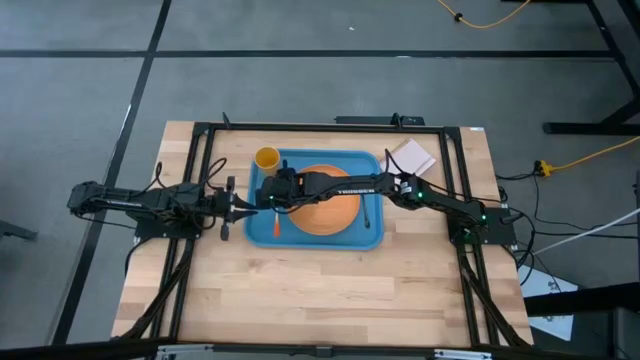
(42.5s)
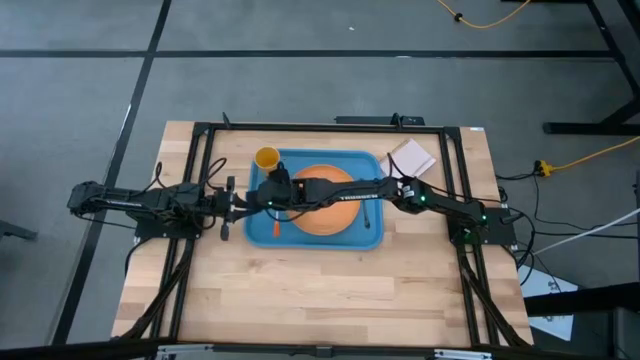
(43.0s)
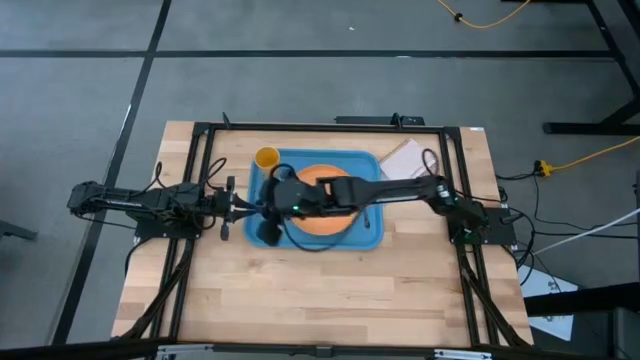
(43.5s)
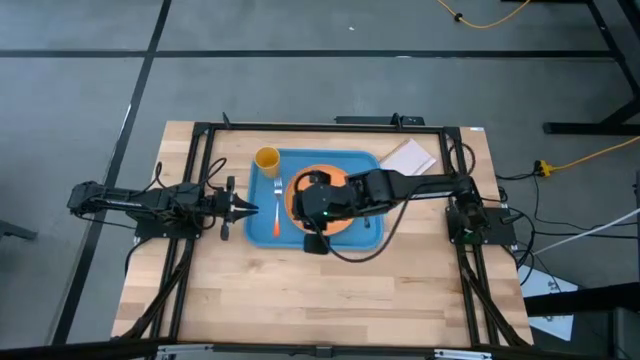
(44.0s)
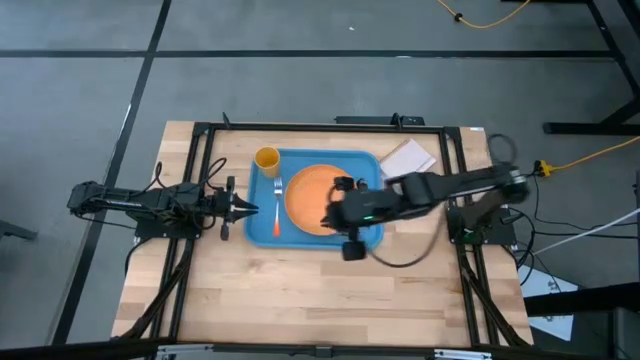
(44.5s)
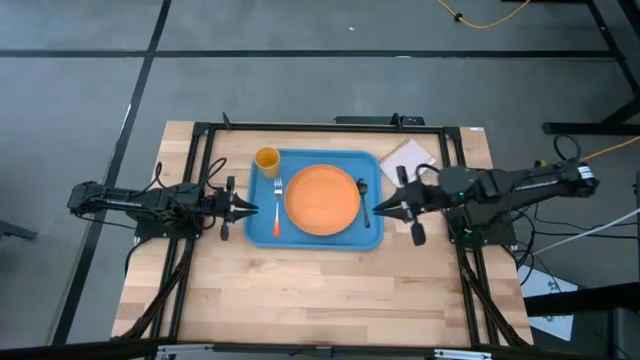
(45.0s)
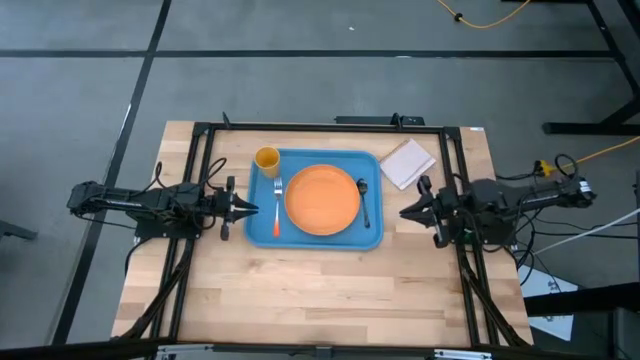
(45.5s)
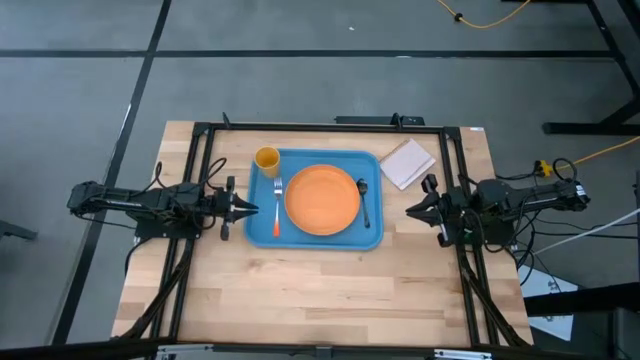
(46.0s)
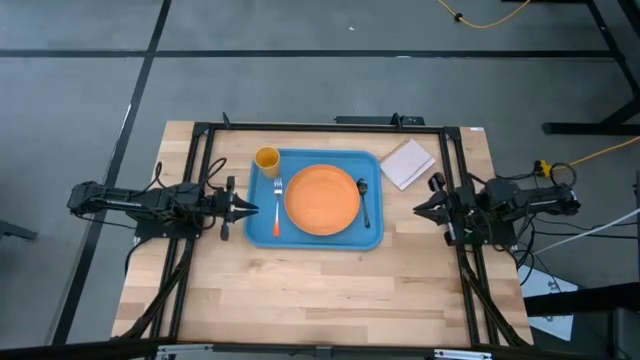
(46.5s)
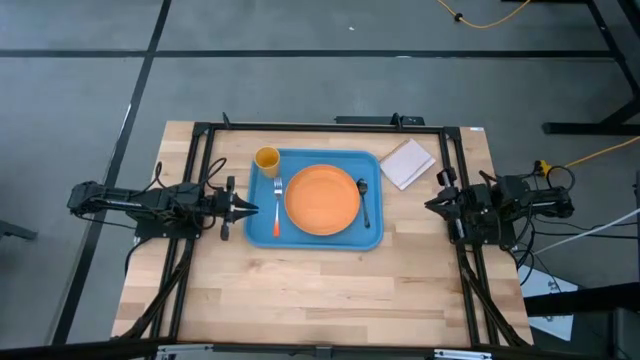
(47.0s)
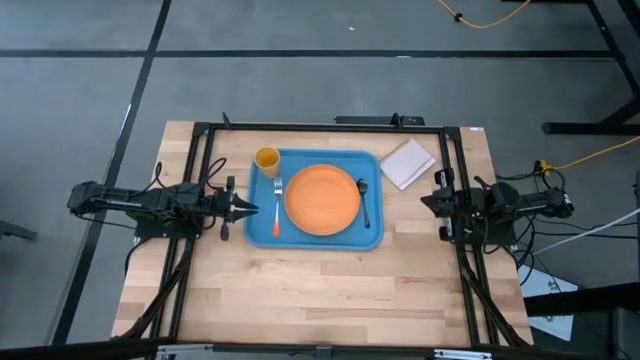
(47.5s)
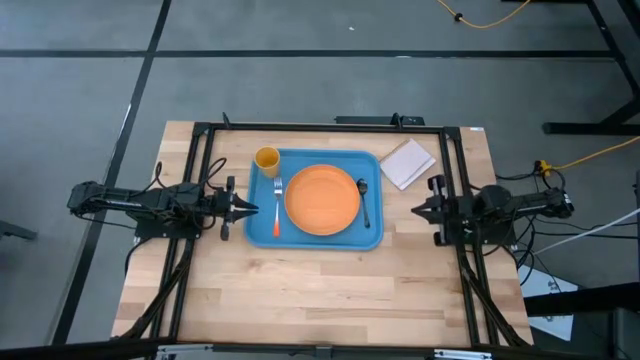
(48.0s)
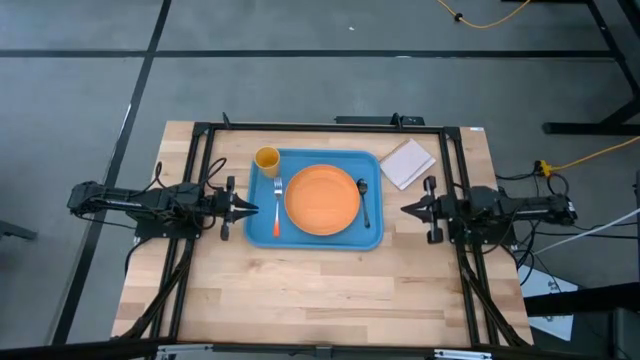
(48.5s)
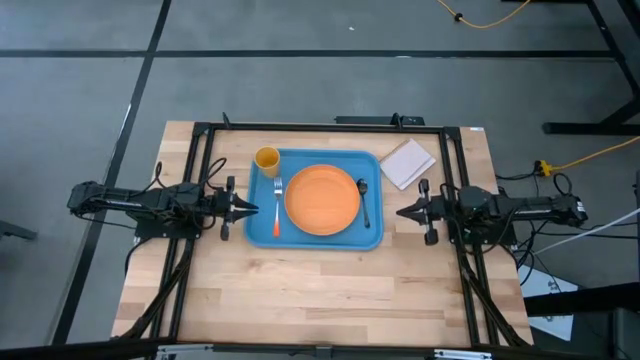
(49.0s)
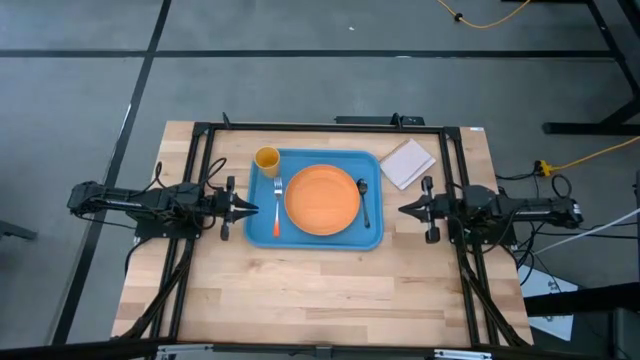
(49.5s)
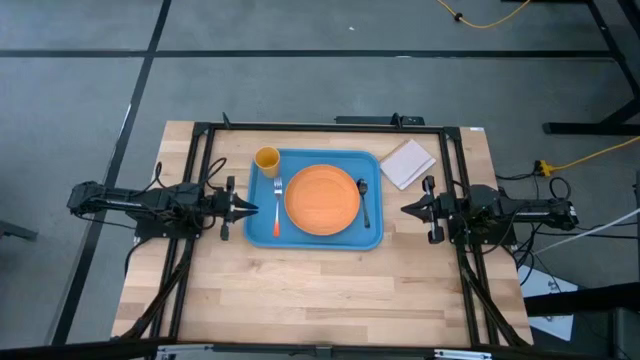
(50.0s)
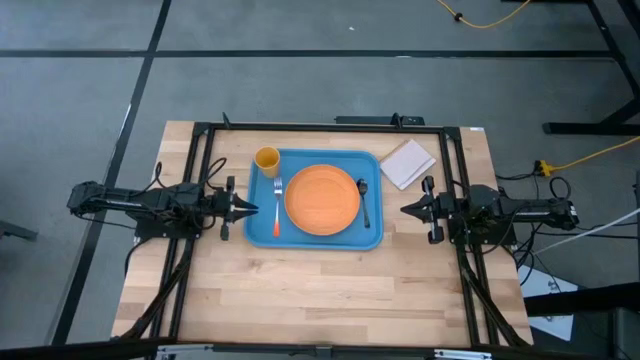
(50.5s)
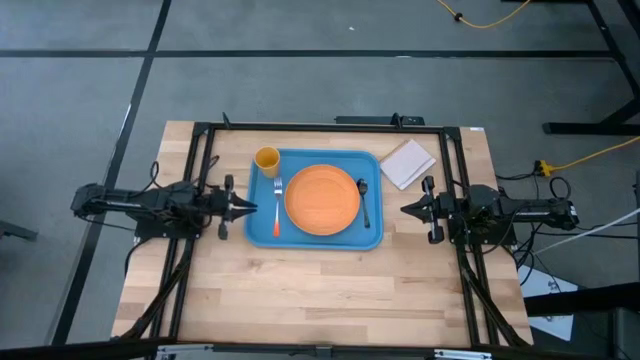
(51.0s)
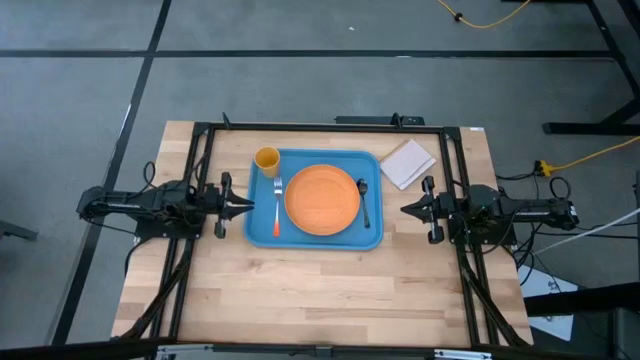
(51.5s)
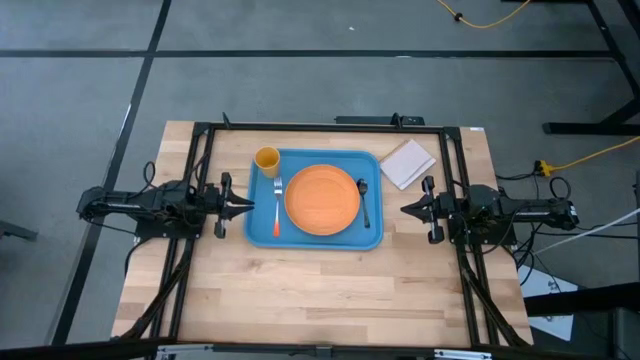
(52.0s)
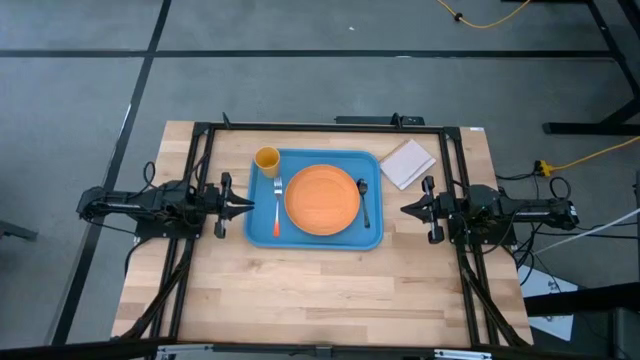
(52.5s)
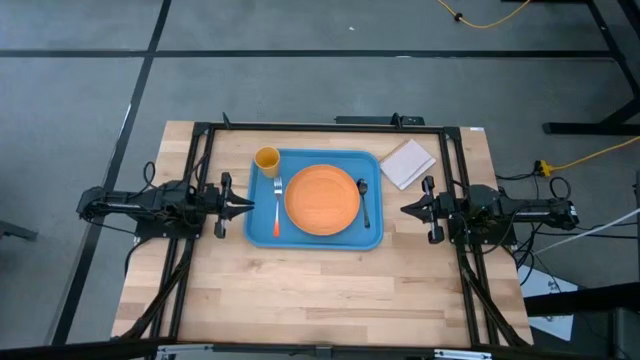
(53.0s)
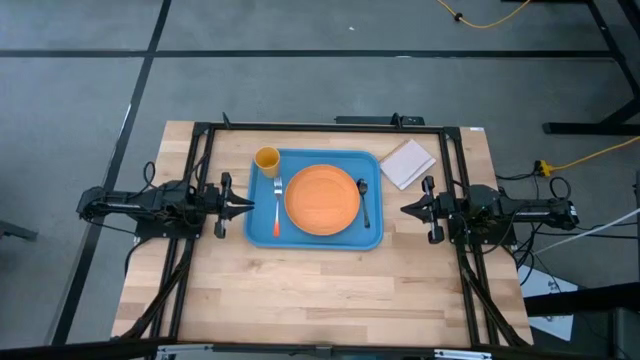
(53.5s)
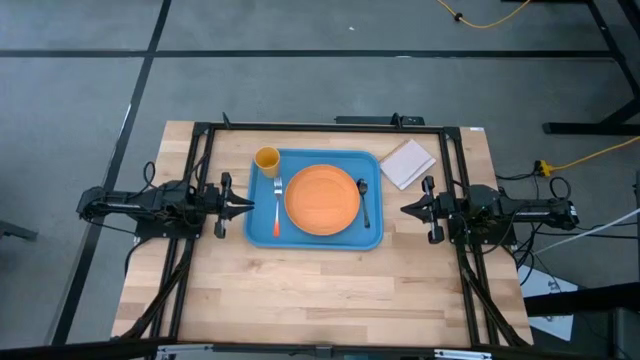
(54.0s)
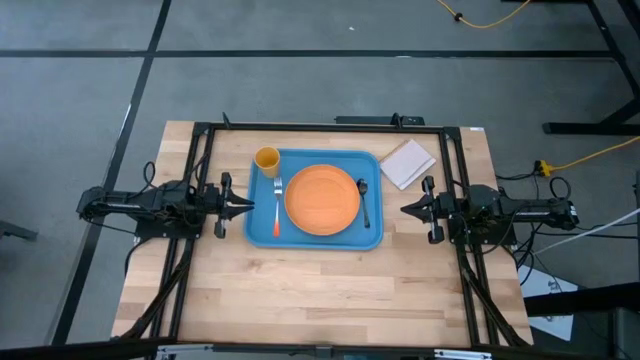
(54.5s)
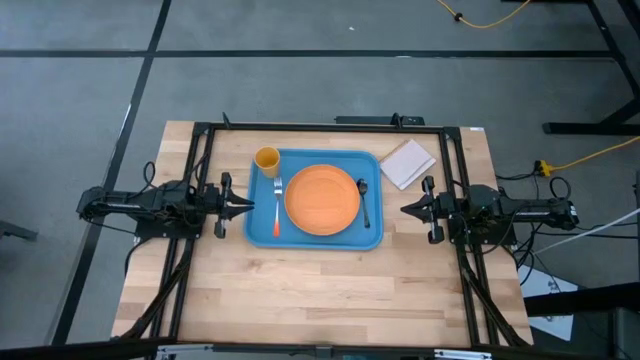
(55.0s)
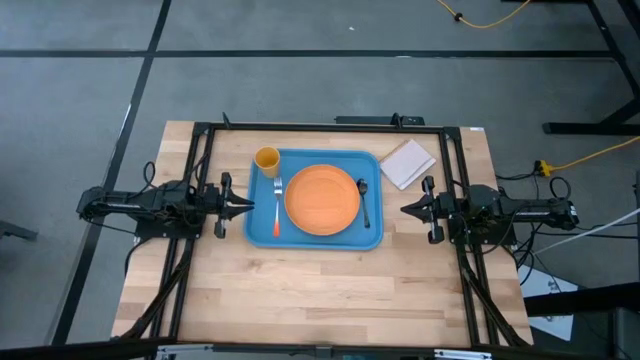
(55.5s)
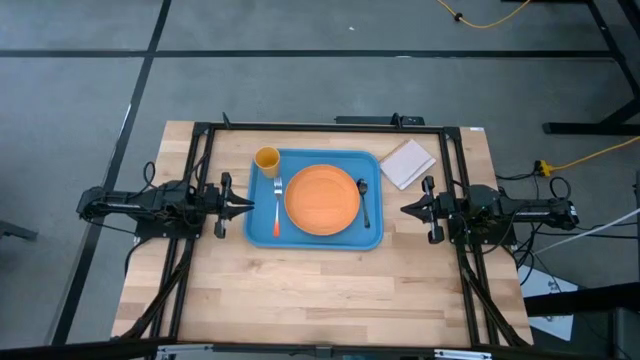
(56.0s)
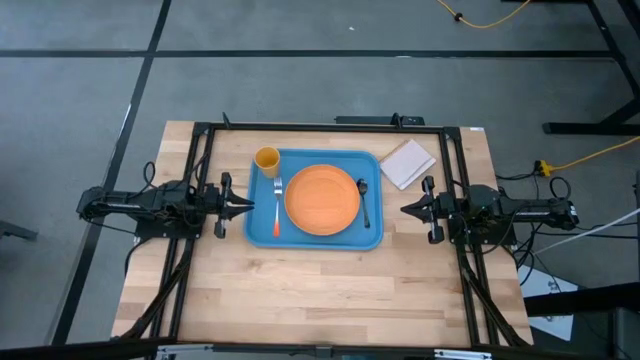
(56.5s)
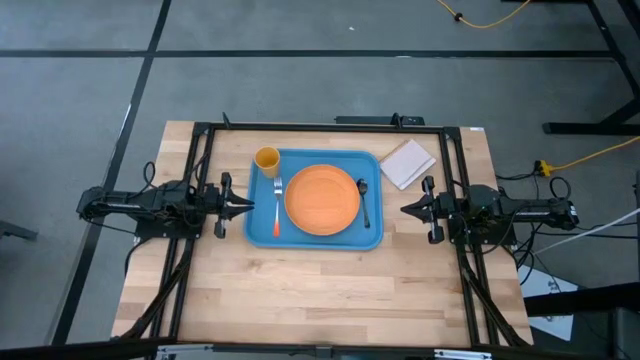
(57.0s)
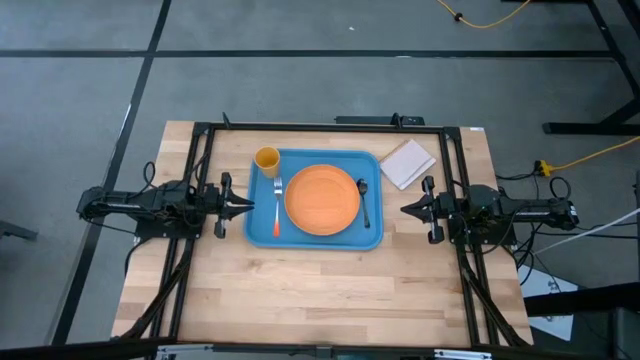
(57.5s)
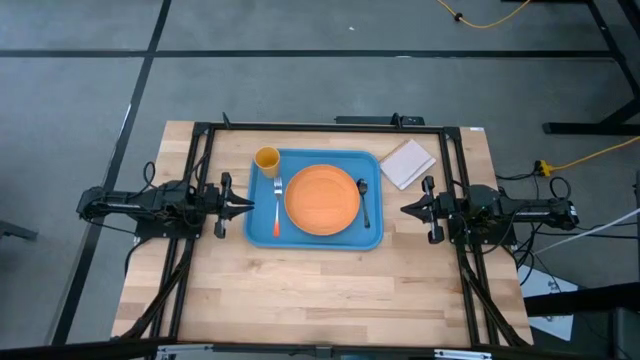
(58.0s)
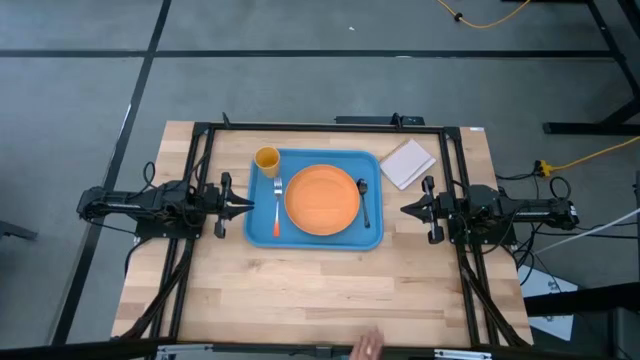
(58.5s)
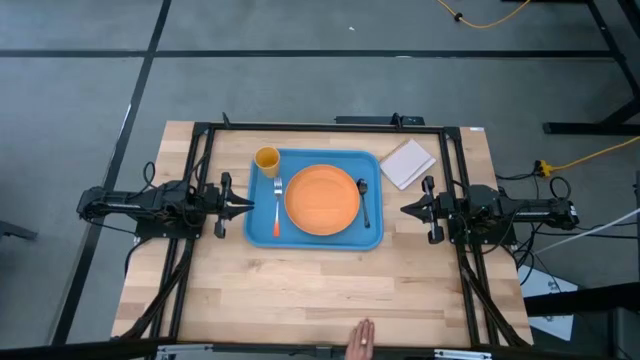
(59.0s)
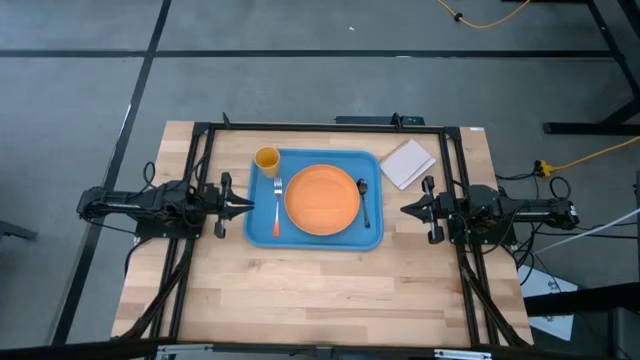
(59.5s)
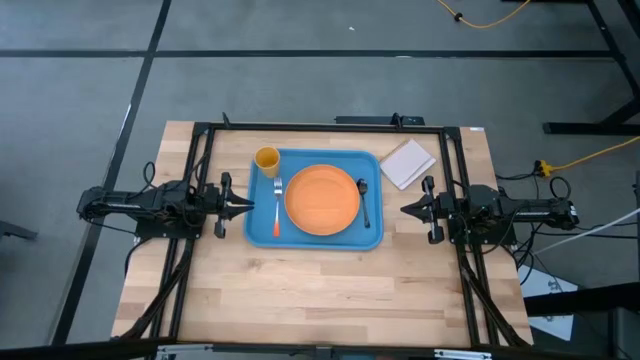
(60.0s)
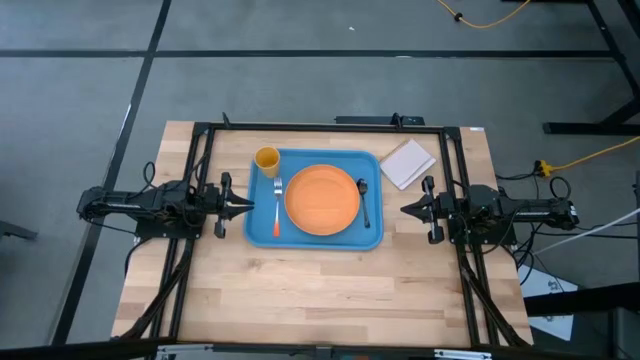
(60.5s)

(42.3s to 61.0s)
Task: Pick and place plate/cup/fork/spoon on tray
Return to Home Position
